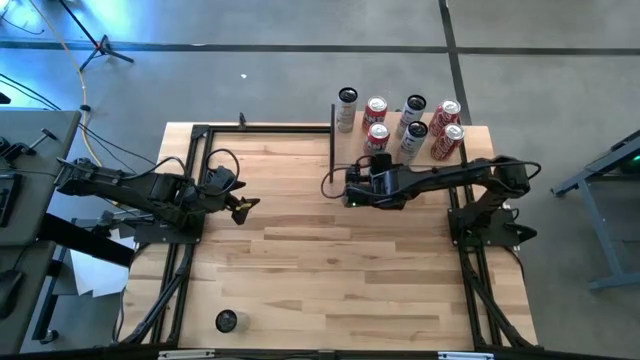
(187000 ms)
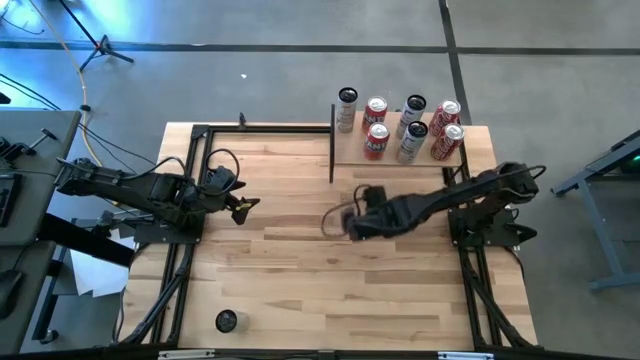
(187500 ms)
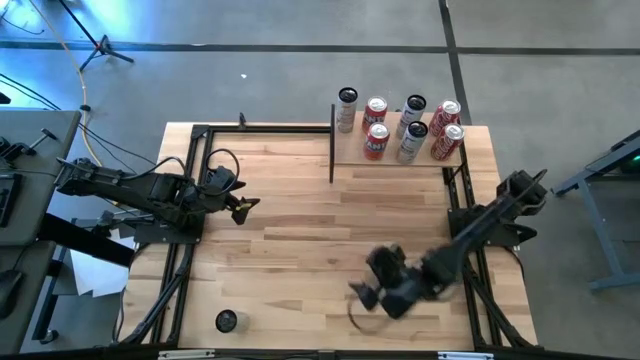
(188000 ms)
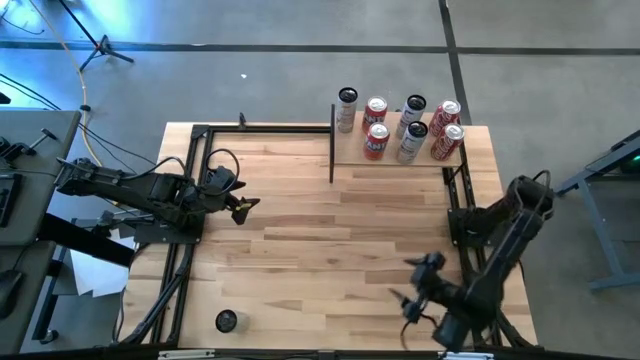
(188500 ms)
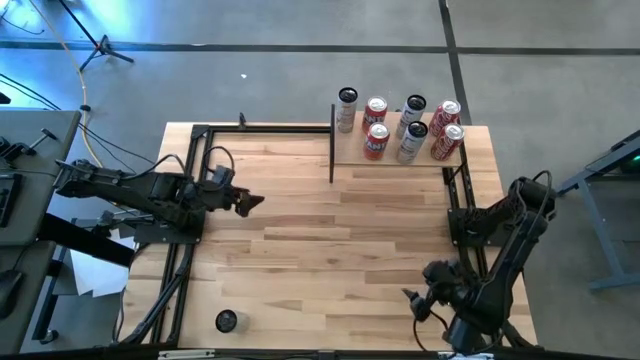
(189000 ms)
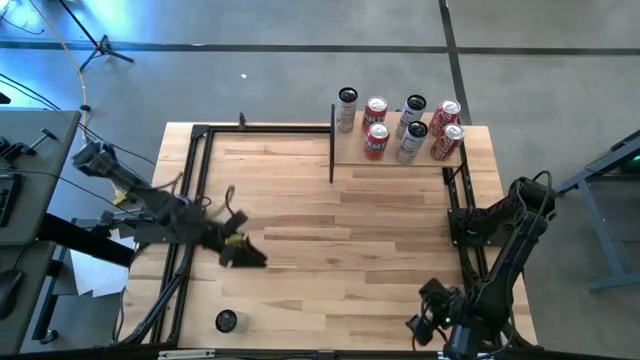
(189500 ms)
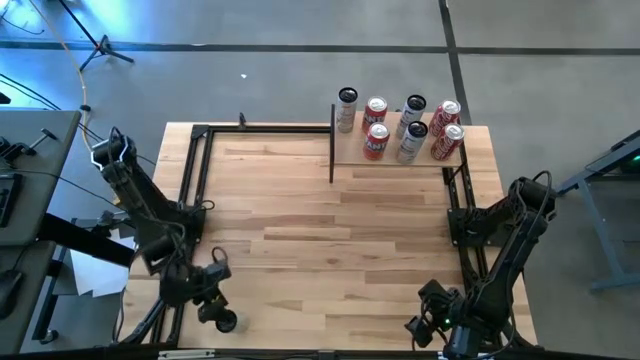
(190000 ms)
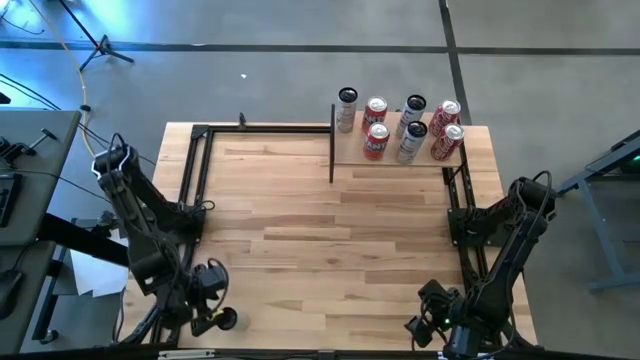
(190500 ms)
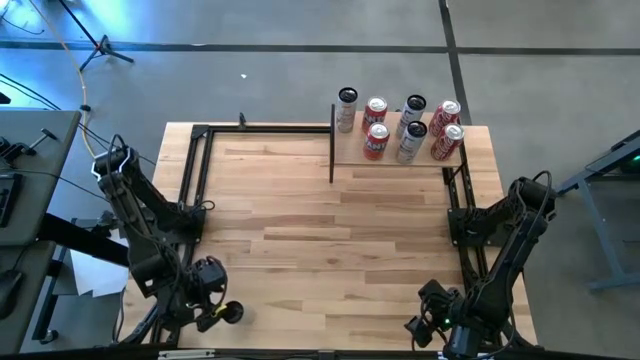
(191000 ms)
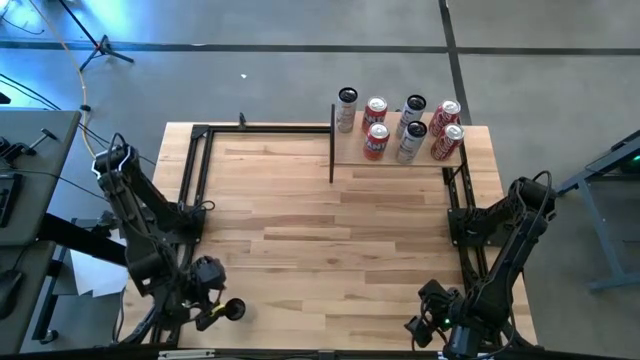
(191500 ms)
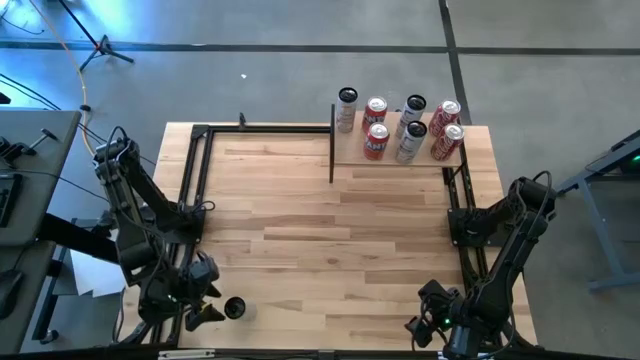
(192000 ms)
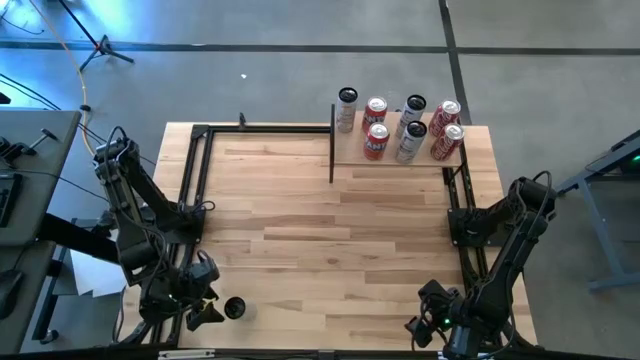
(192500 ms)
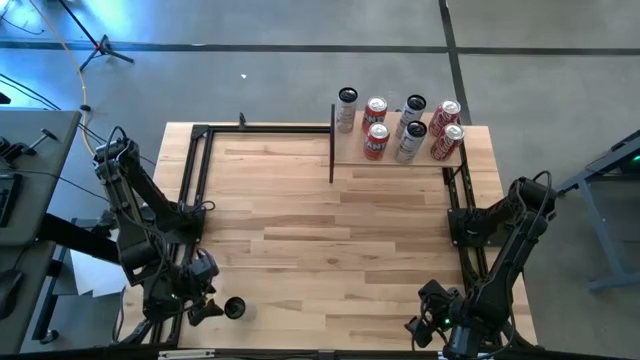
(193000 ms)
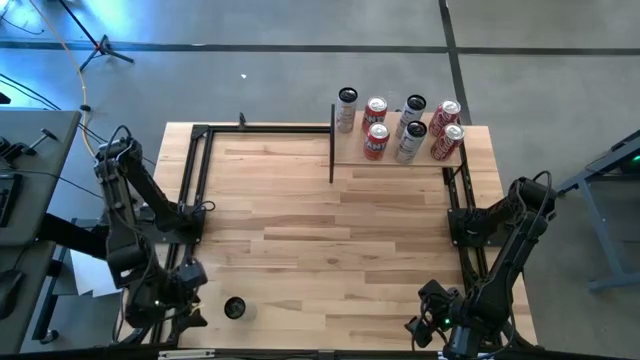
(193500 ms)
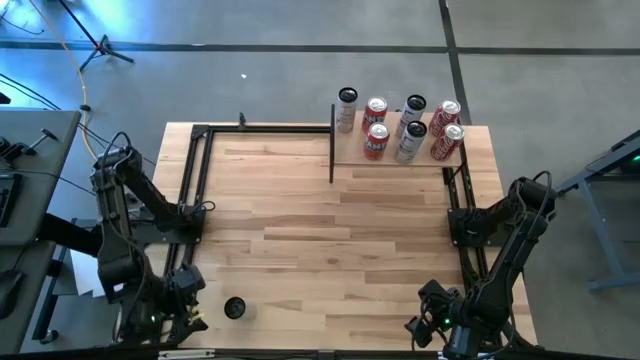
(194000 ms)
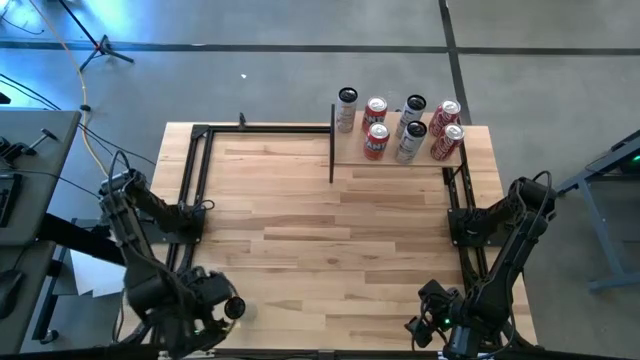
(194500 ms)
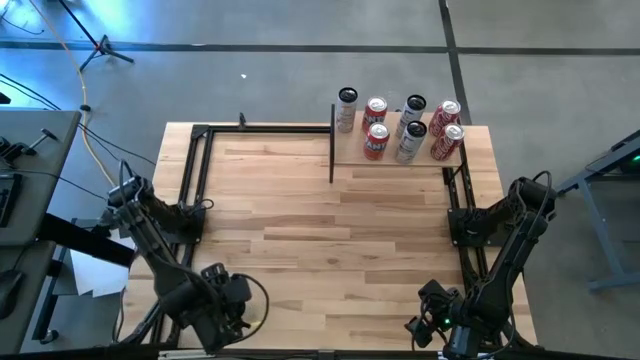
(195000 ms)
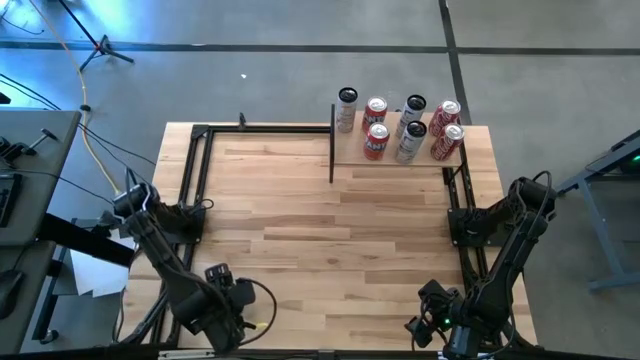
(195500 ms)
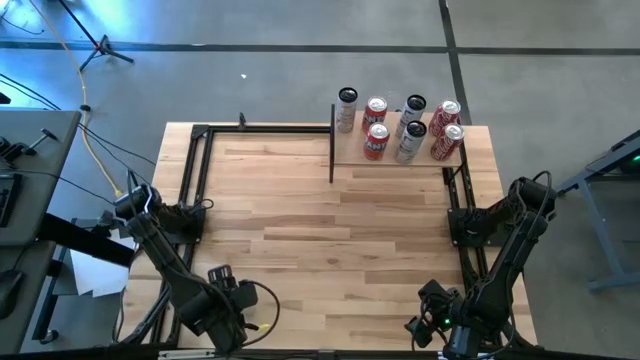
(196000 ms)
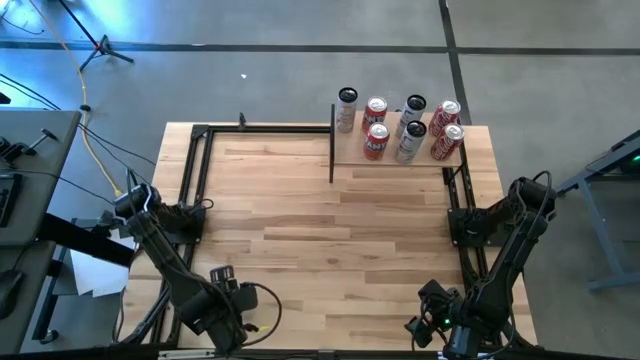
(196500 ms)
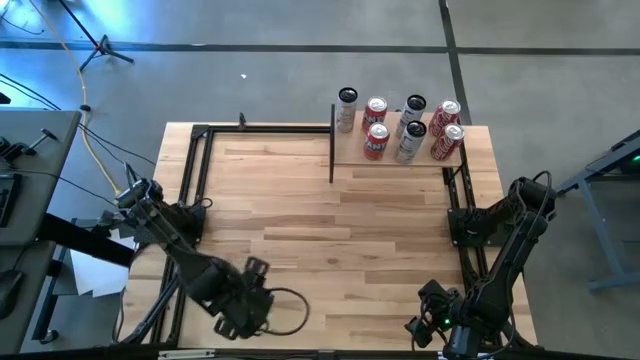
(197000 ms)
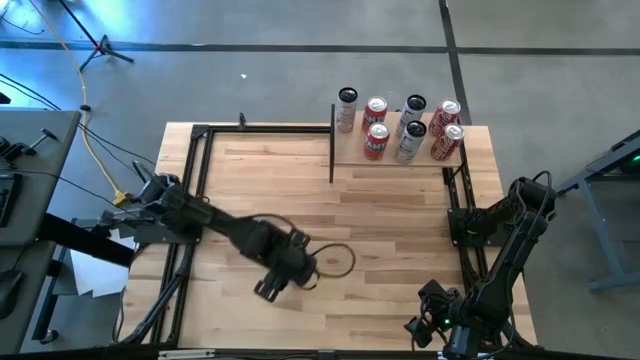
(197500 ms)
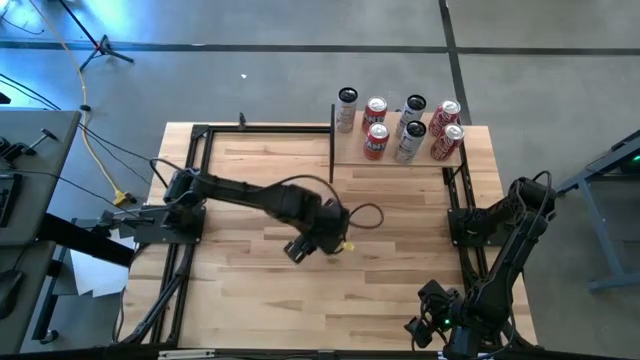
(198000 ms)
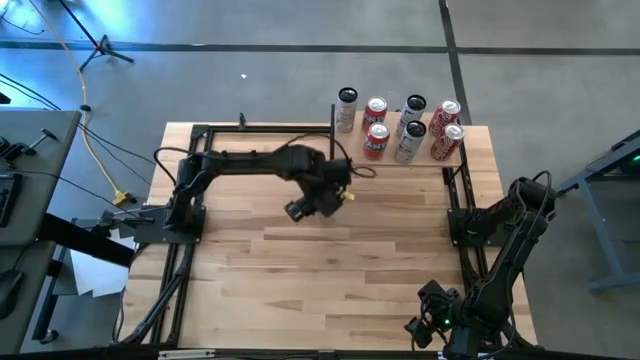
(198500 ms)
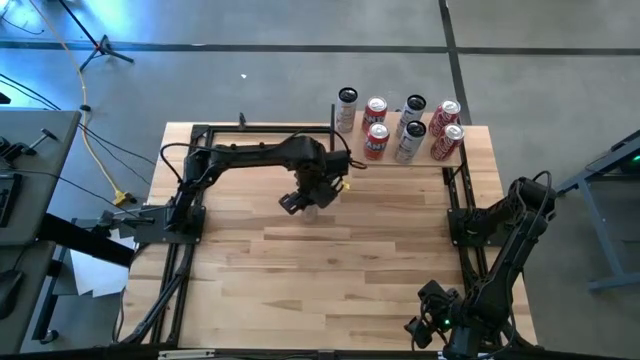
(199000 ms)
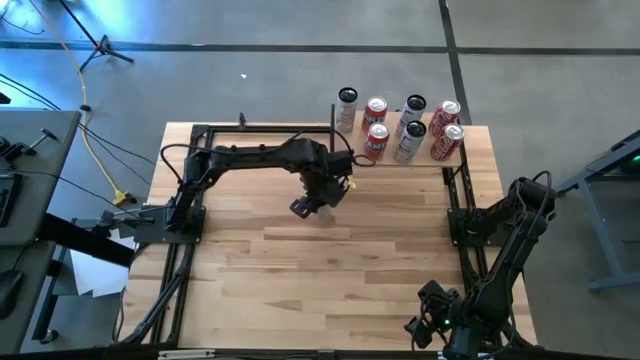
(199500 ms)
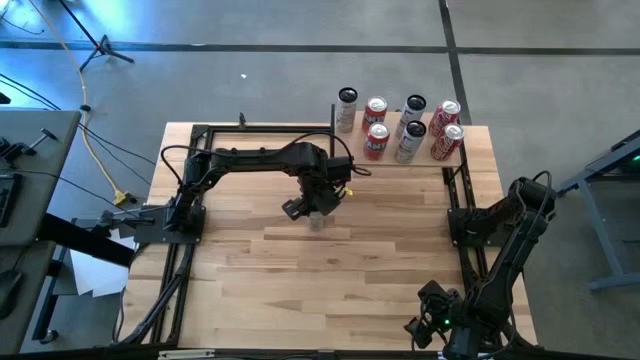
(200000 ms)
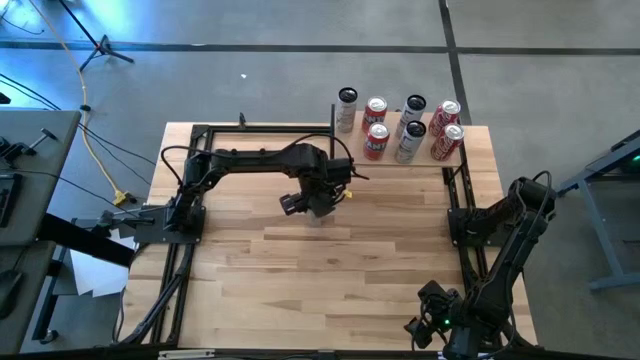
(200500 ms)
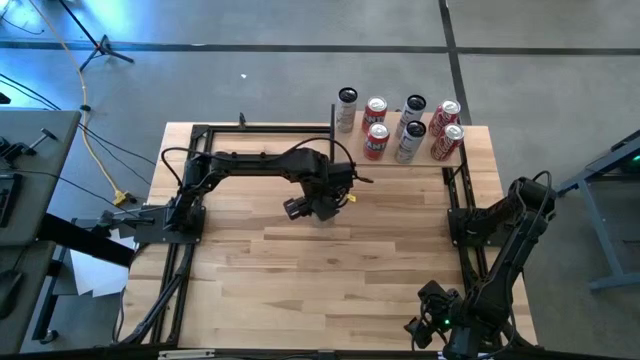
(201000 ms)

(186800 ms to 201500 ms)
Task: Place canned beverage on shelf
Put the white yellow soda can on the shelf aligned with the other white yellow soda can

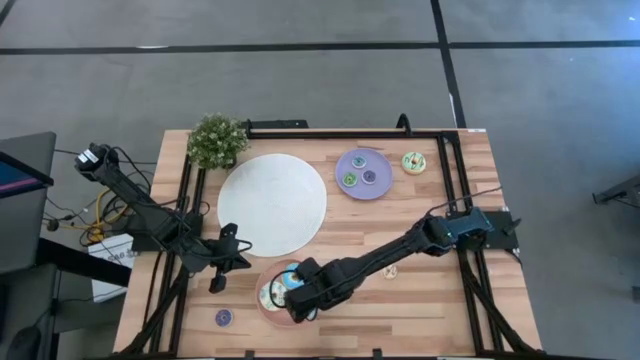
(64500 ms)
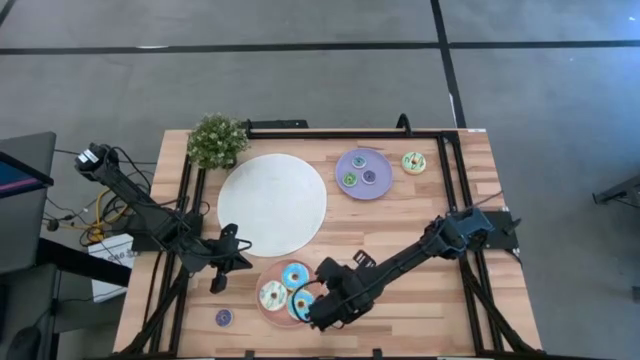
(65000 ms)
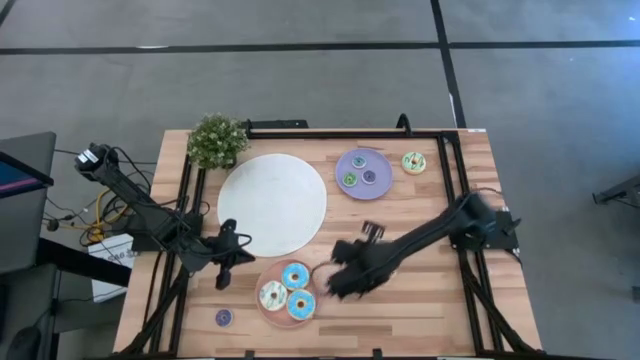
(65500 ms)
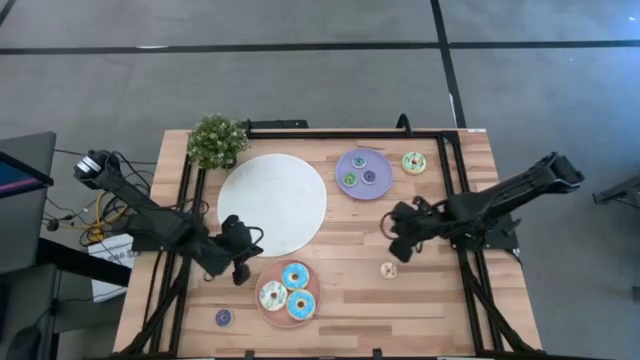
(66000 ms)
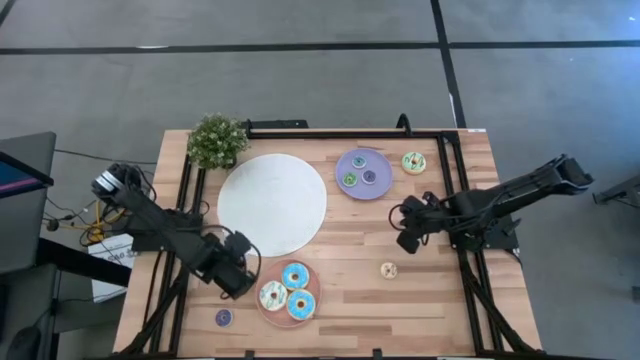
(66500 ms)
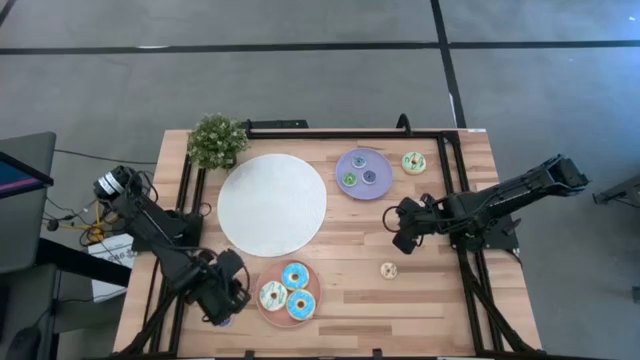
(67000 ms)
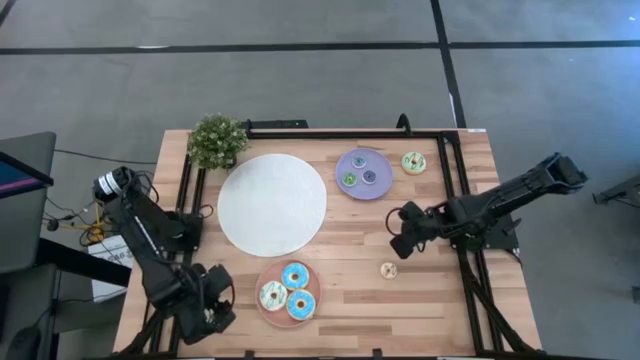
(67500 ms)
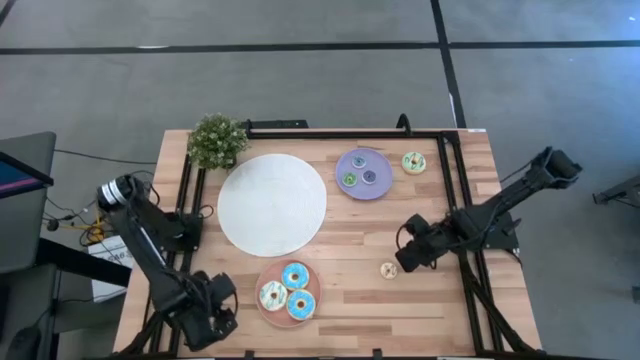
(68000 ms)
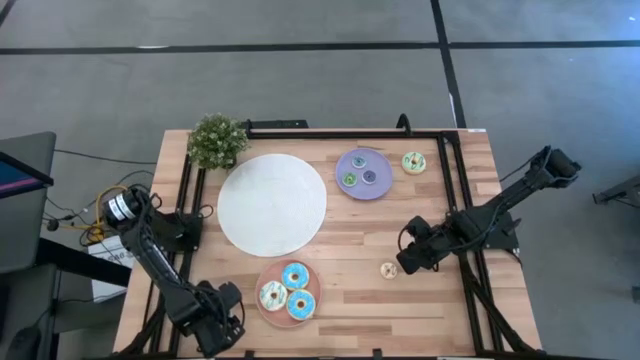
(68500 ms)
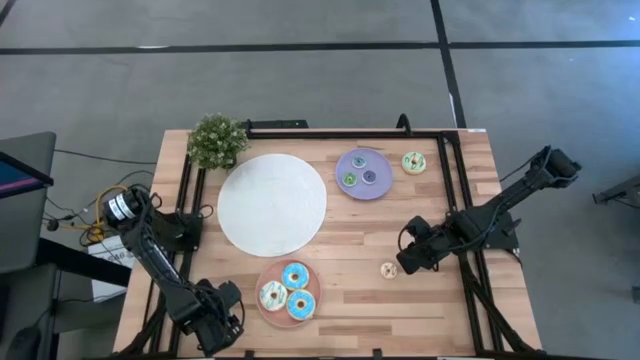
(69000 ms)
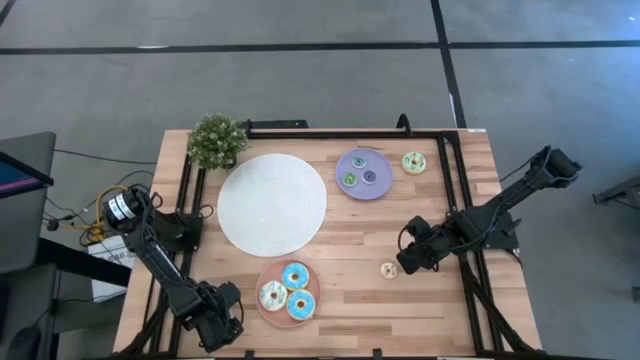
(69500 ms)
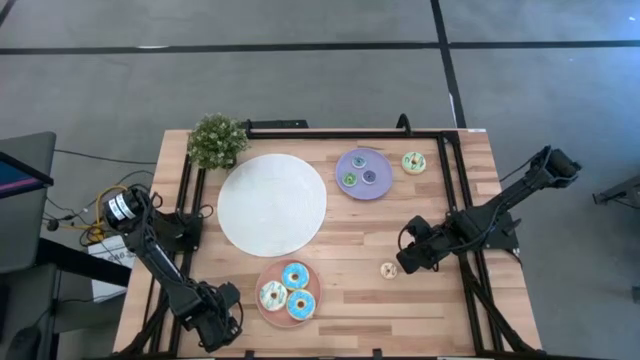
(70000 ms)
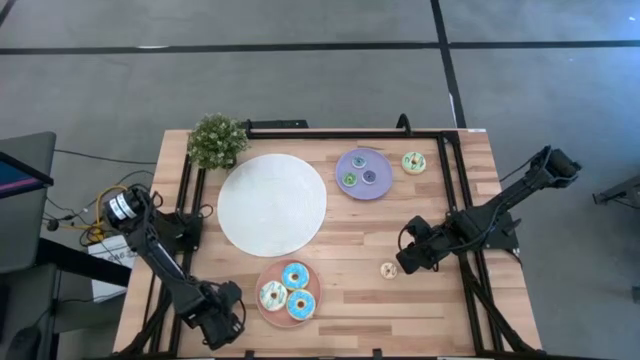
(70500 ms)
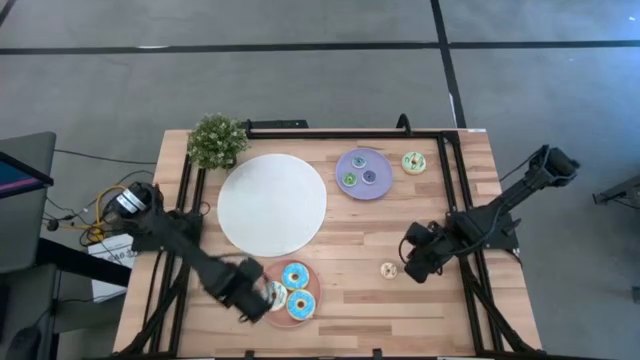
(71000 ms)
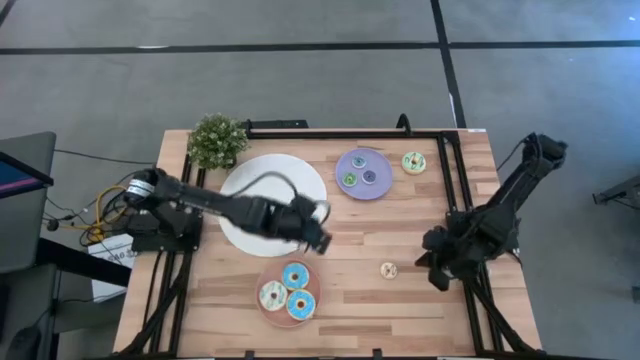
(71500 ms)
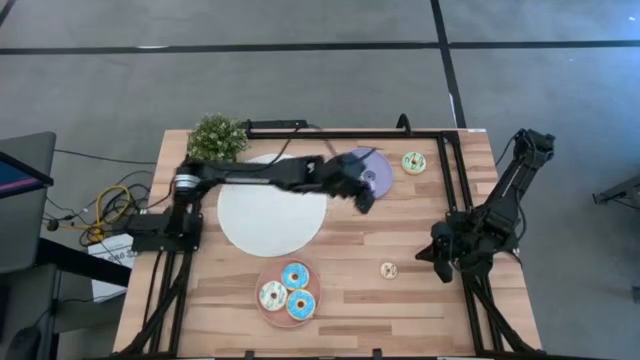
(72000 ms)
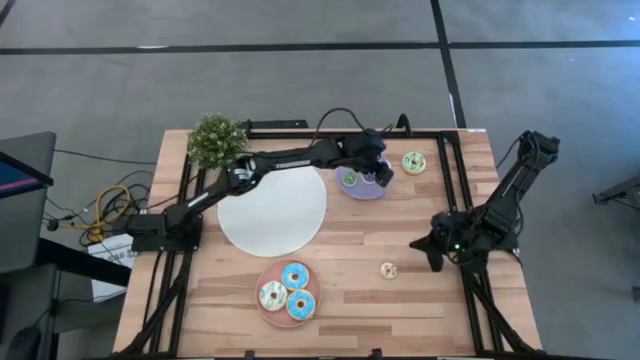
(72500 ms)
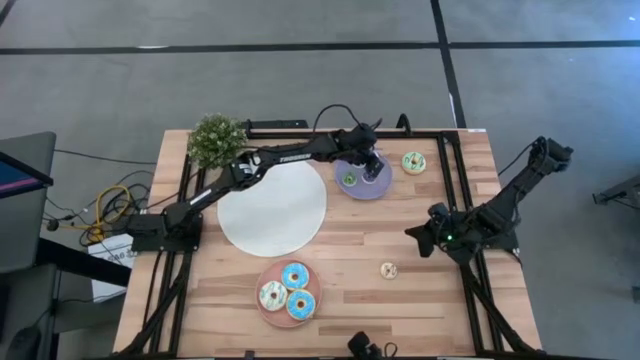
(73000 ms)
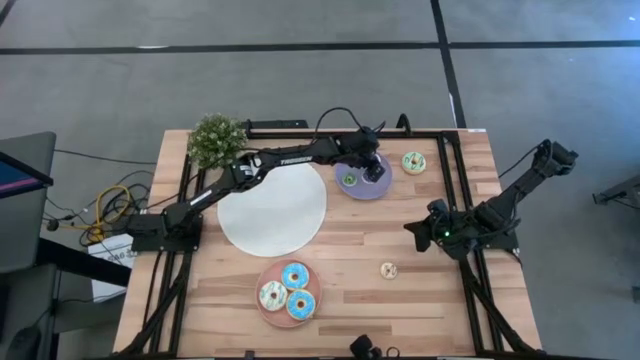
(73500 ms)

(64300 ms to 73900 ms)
Task: Pick & Place donuts
Put the small dark blue donut on the purple plate
